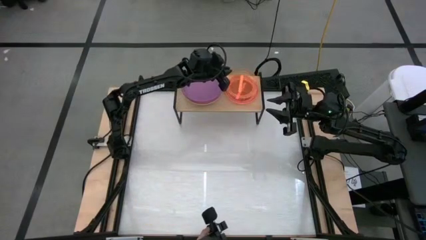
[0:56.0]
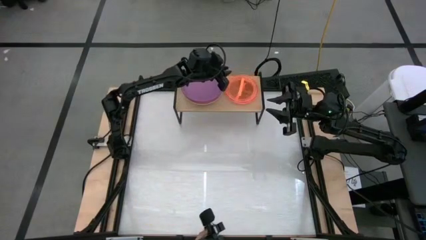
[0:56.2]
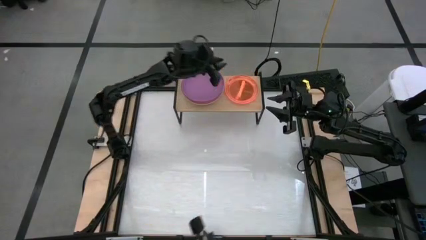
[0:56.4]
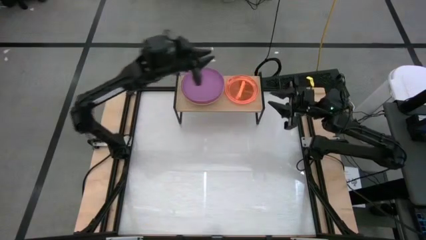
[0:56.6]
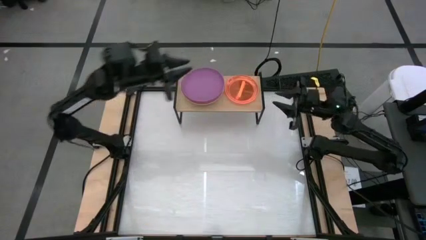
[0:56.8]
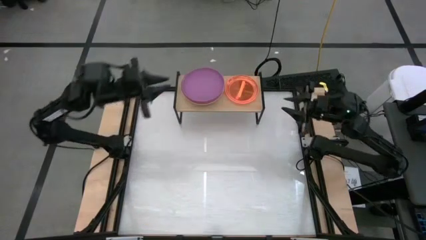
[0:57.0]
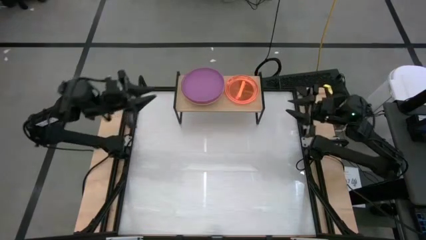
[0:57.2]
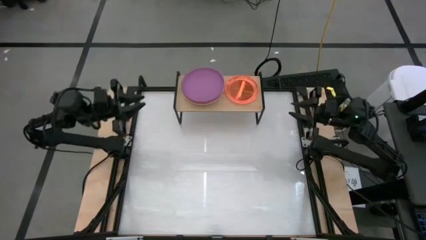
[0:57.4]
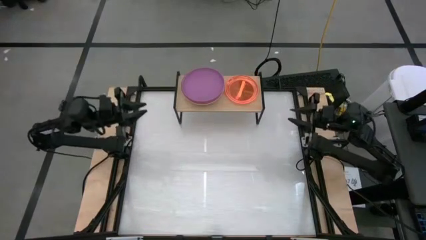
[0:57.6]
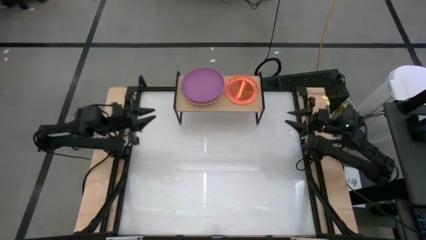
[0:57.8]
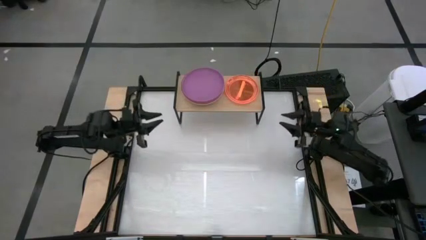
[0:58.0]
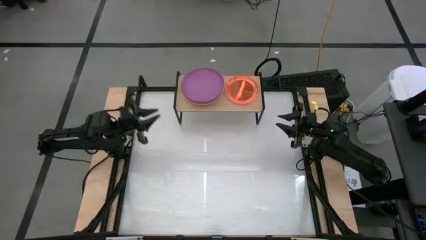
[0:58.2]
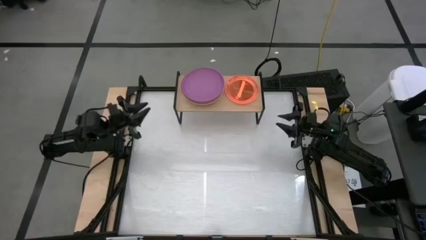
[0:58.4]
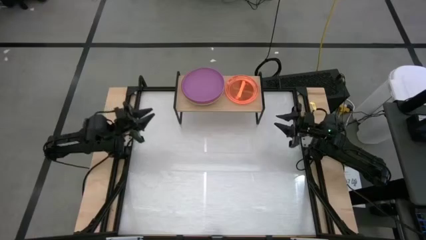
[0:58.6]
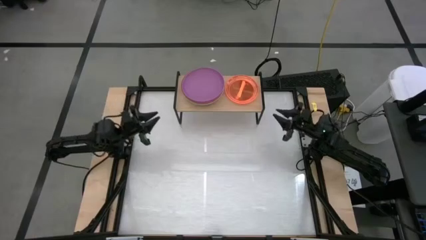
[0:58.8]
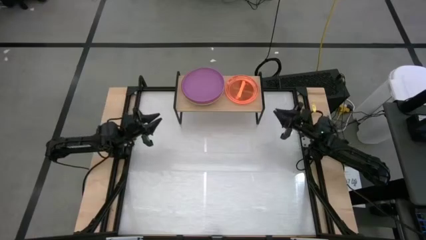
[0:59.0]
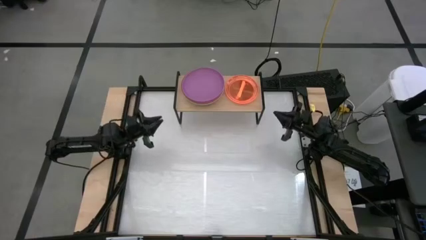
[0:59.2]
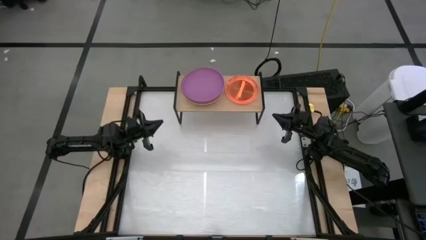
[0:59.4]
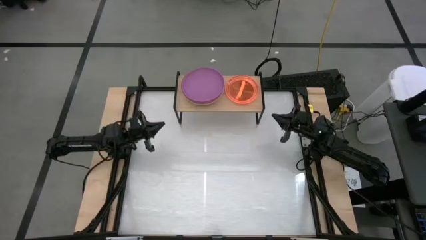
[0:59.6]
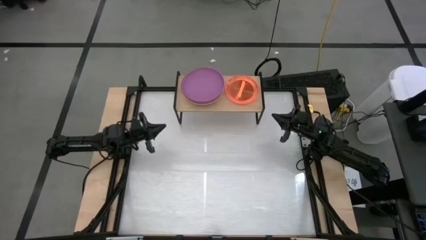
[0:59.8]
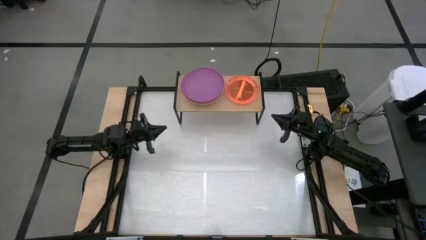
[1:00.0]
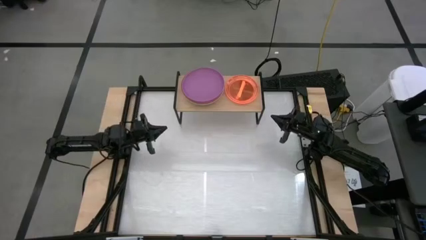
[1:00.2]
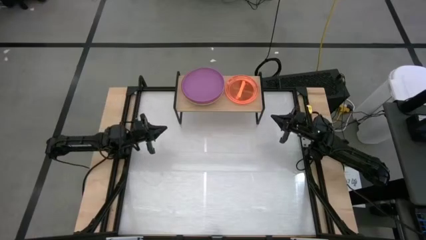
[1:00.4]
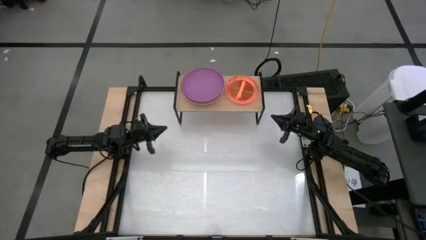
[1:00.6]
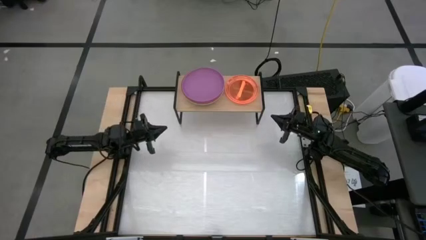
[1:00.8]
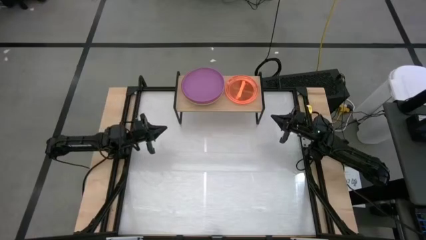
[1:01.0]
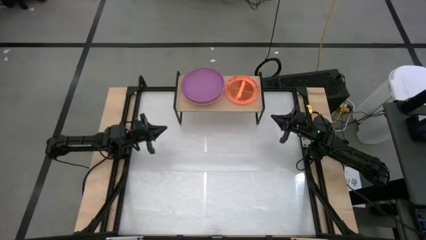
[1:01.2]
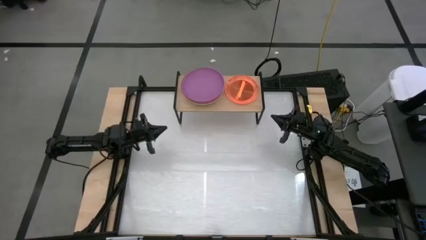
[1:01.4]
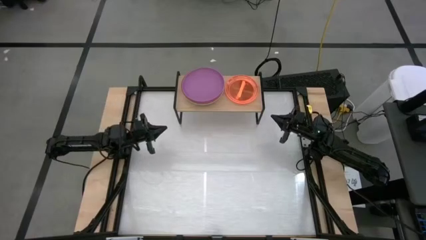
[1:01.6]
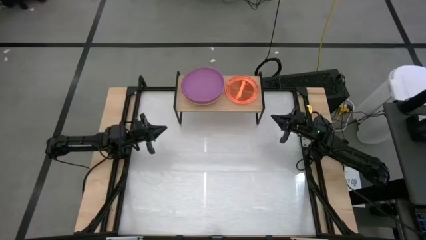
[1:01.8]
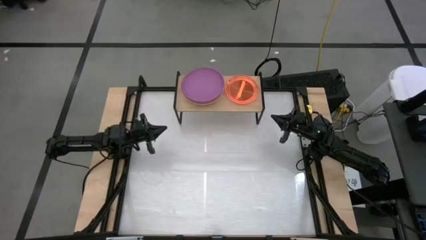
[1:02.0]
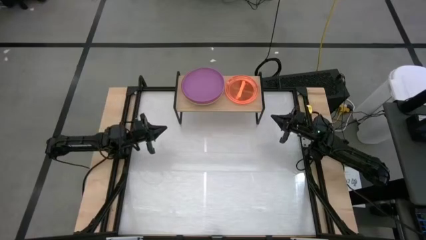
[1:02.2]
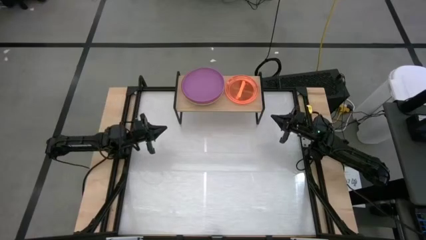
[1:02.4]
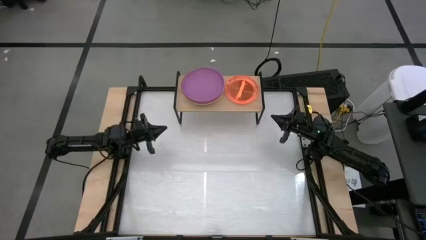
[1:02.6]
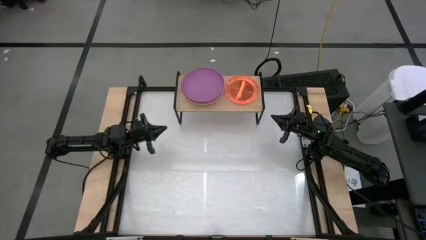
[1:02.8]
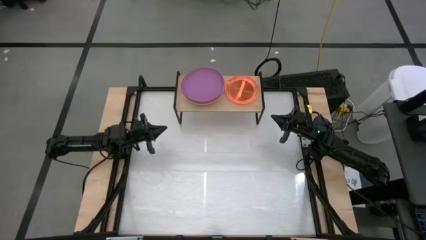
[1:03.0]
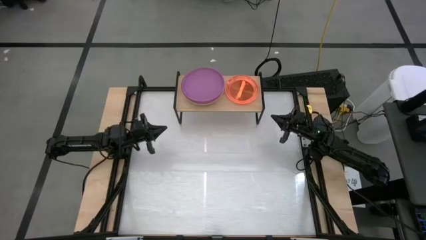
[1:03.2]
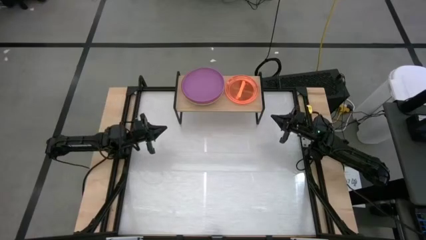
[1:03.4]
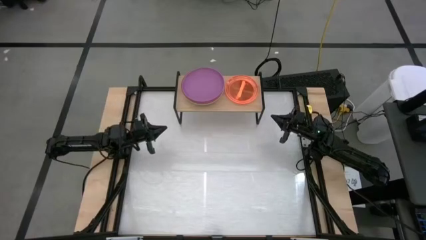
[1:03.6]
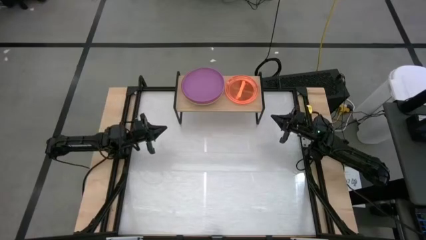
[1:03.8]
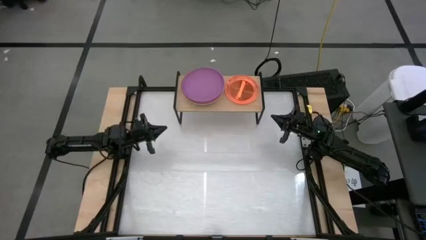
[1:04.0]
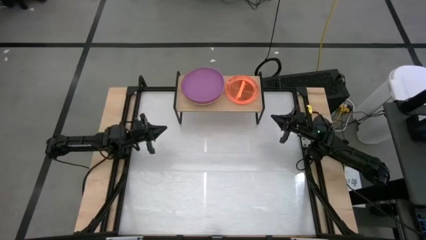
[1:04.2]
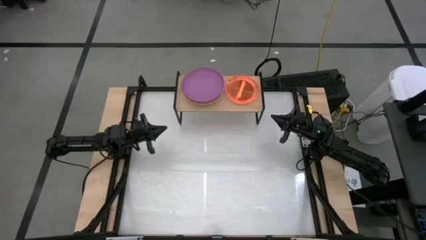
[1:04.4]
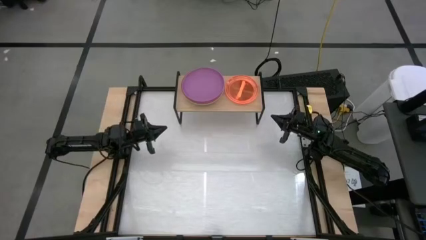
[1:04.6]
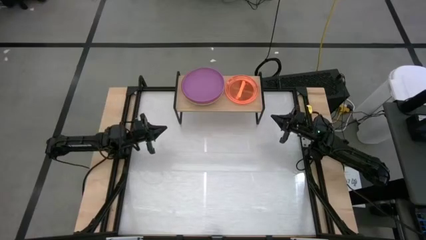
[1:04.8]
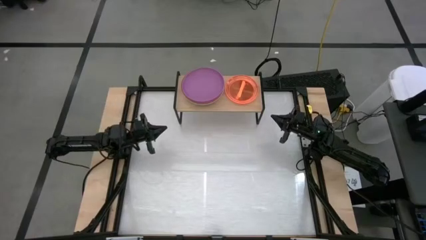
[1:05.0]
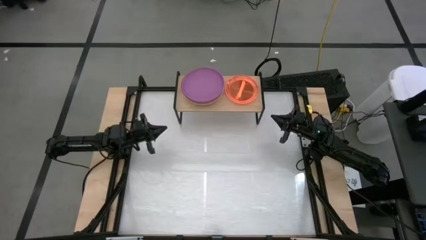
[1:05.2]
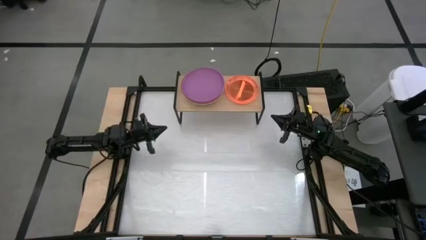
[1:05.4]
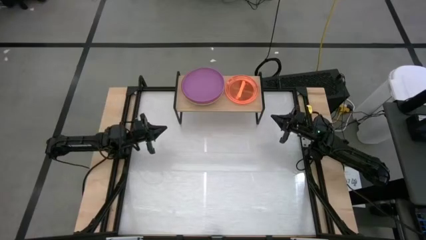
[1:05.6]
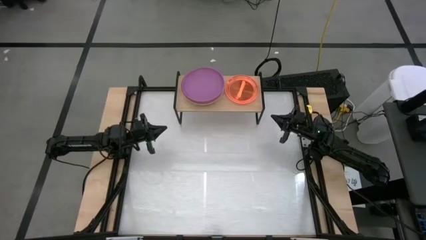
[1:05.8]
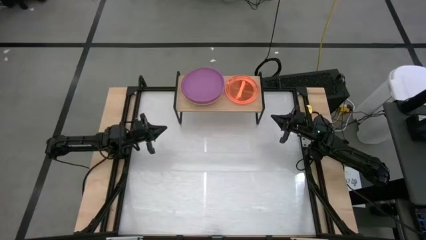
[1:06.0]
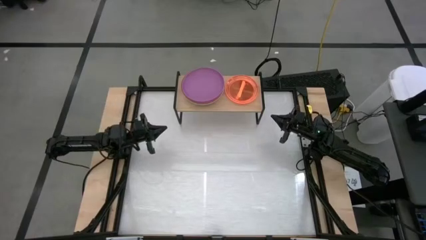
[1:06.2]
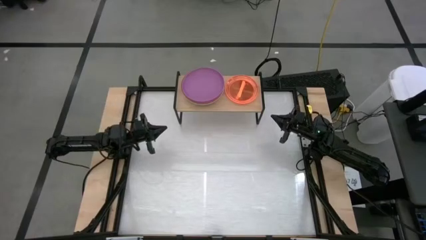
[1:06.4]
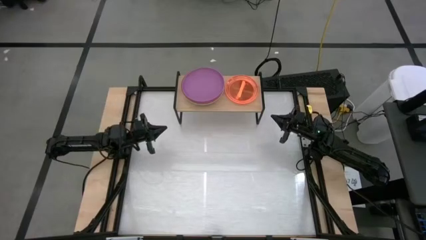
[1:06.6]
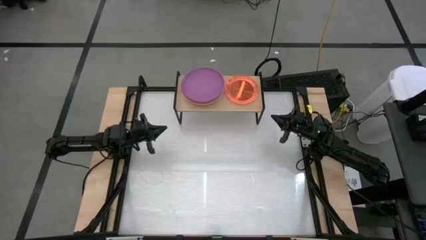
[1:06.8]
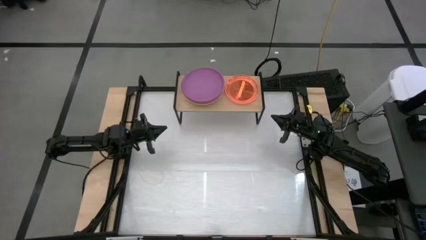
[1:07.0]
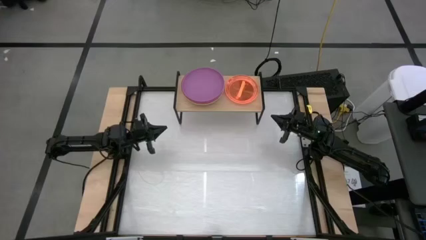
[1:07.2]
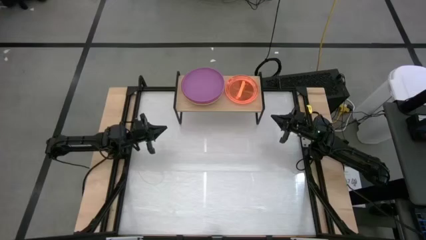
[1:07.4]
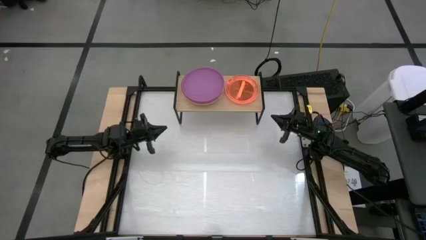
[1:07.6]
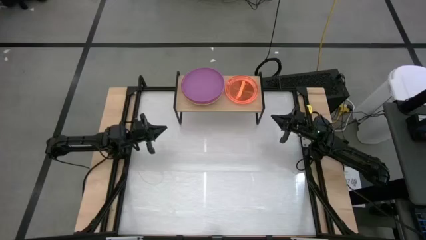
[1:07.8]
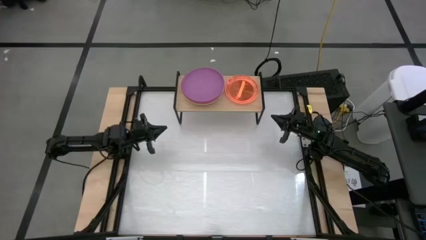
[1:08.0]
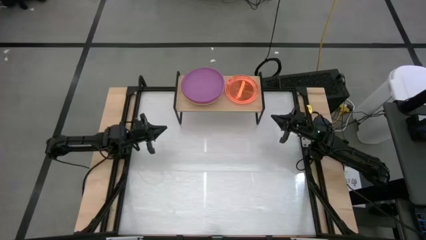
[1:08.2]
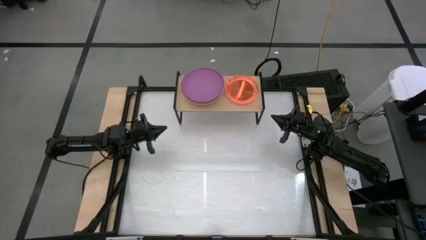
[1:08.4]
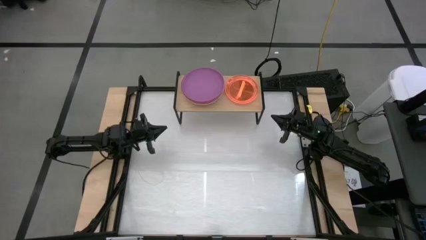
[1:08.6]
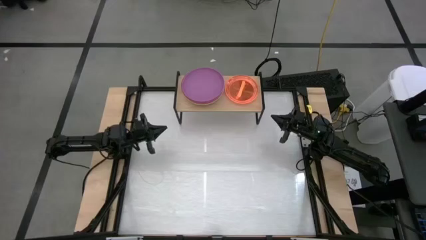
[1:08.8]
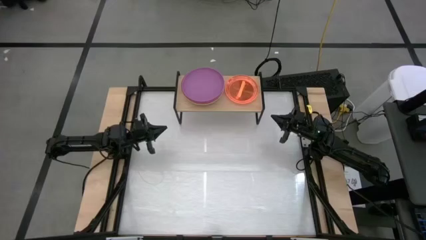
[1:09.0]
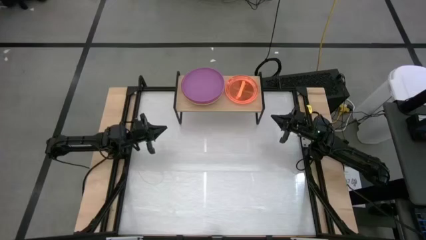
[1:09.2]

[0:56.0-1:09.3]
Task: Place and stack plates onto a shelf
Return to Home Position
